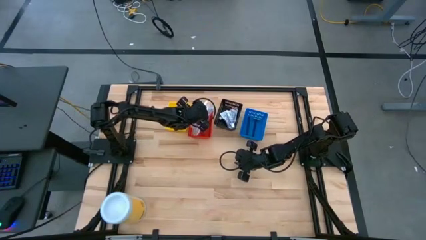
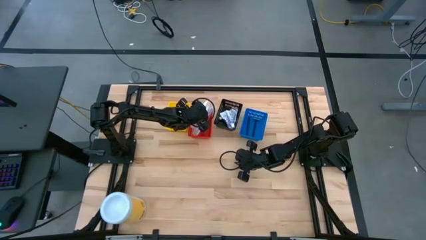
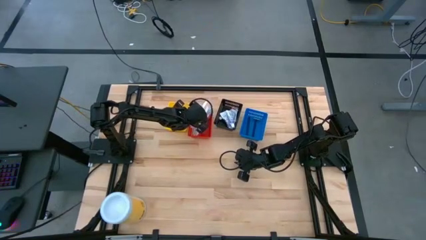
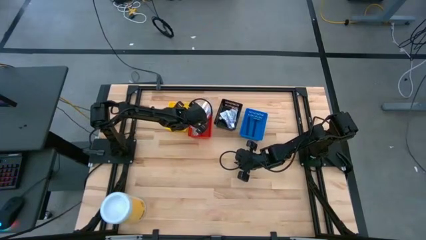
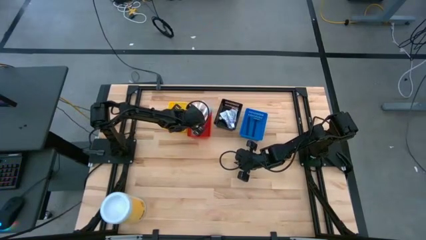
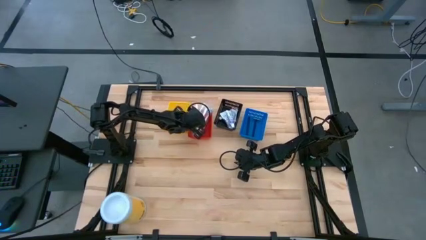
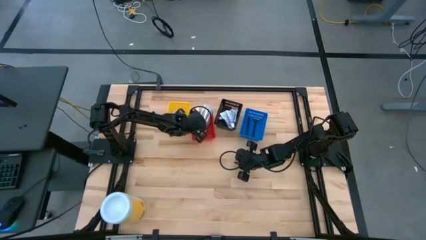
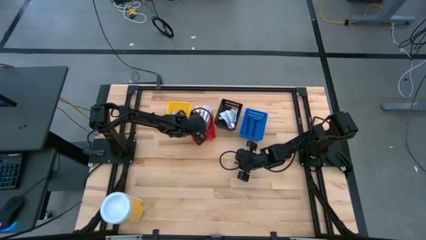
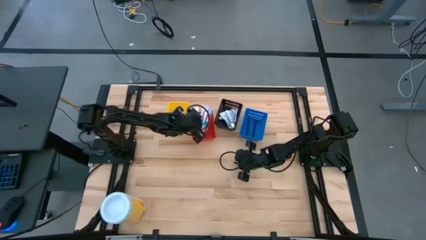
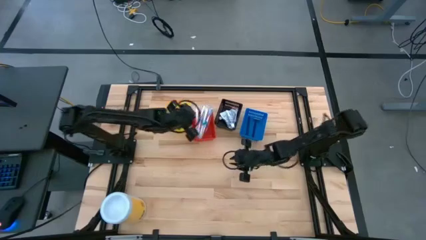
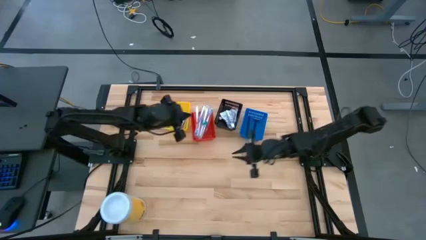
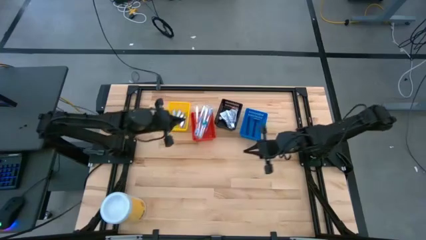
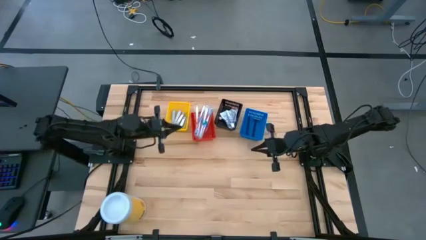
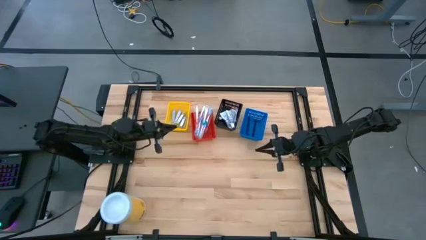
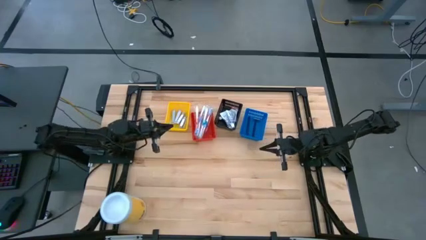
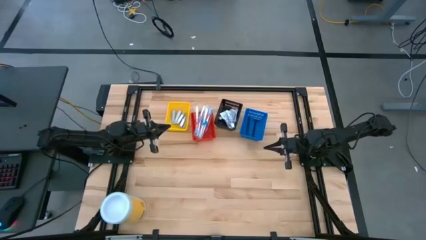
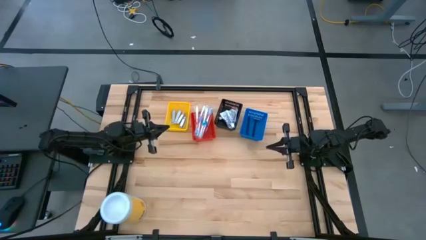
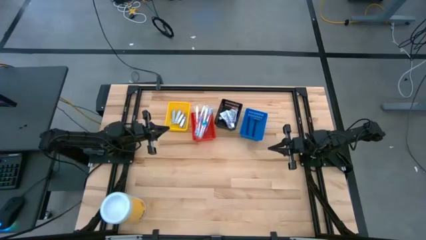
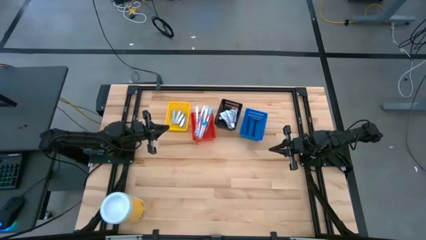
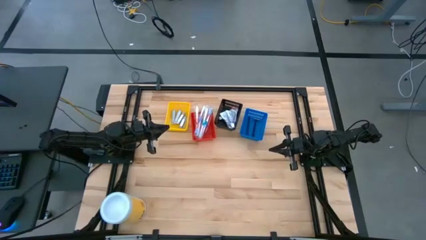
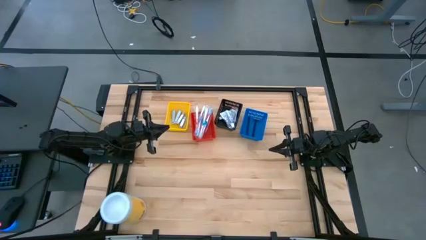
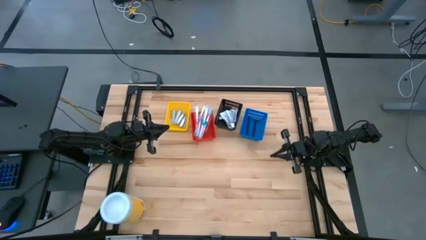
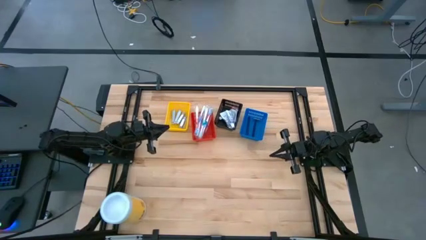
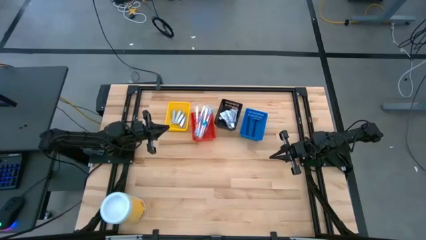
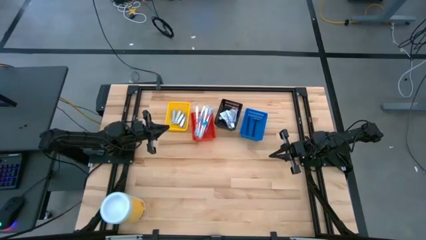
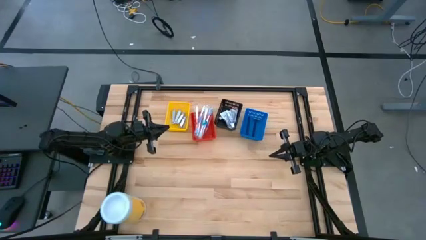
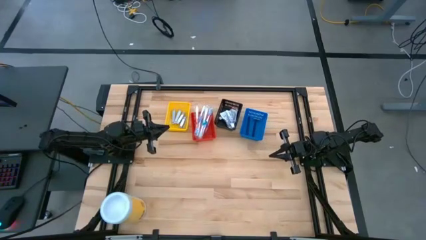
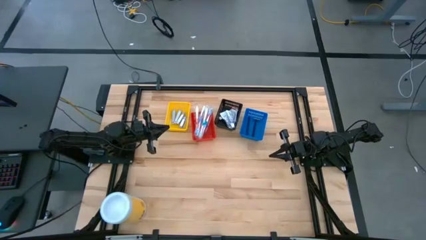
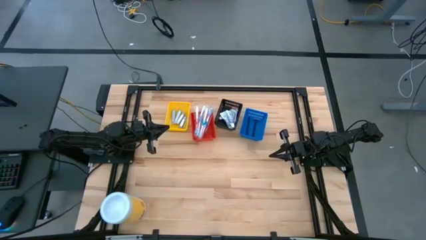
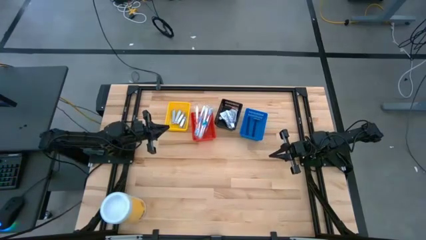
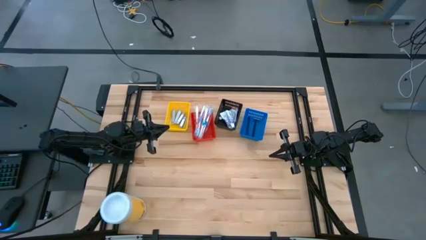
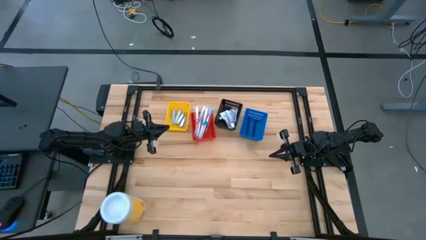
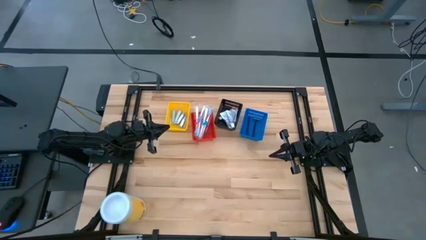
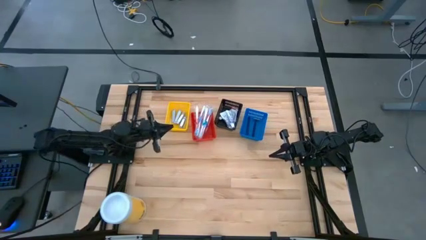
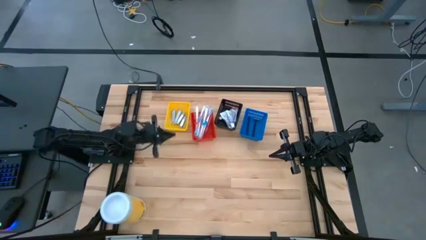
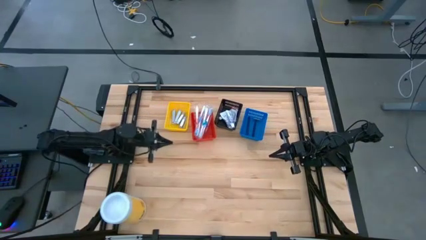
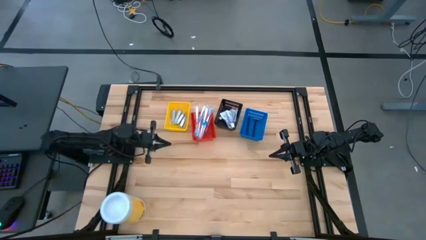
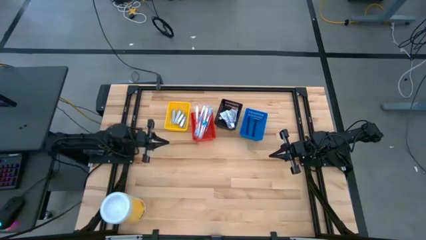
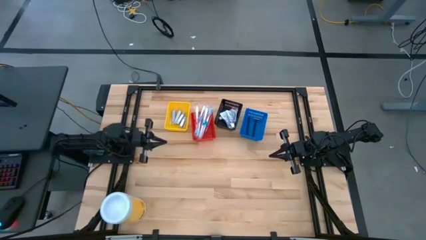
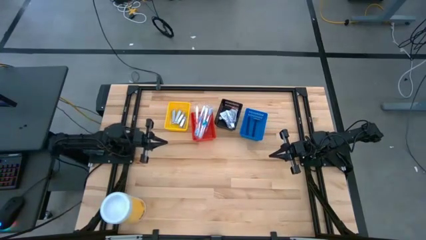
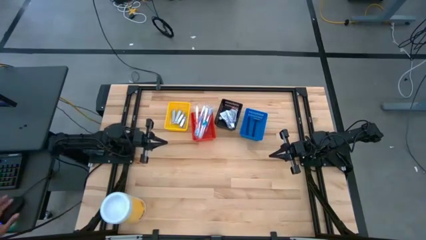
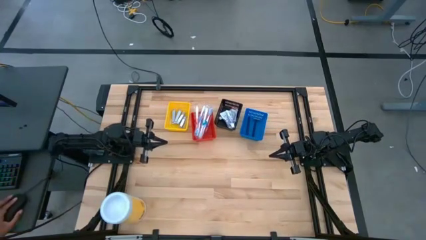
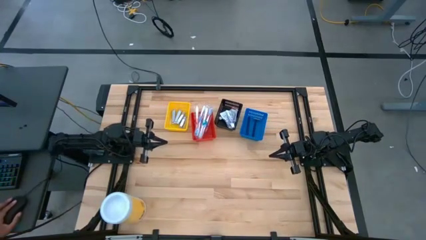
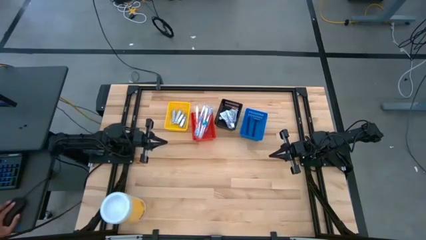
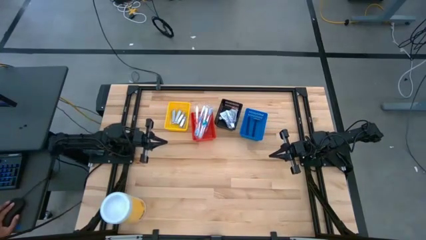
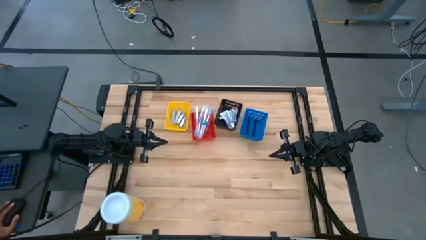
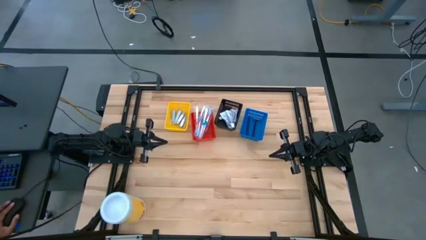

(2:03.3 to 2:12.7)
Task: Pick & Place Travel size toiletries
Return to Home Position

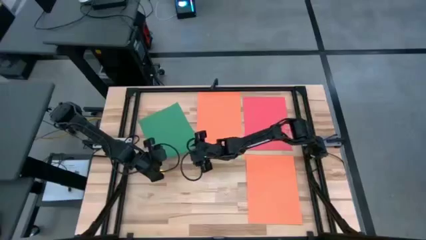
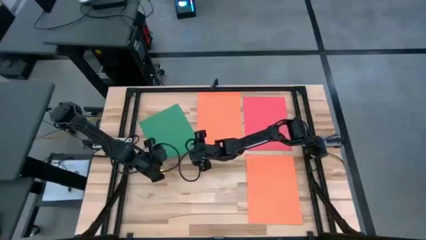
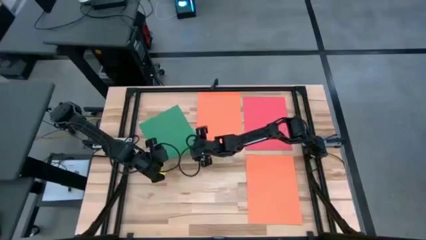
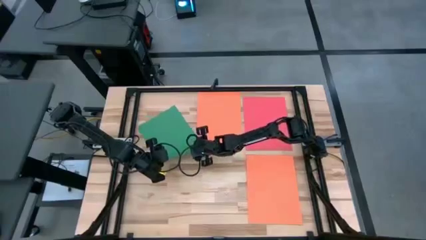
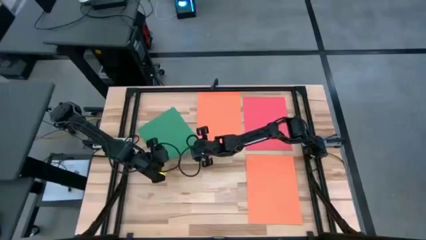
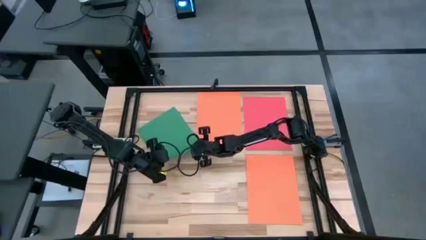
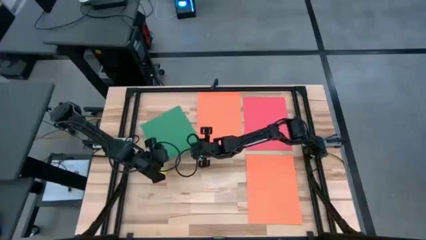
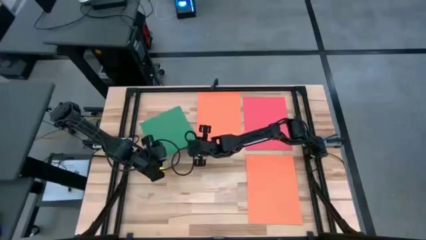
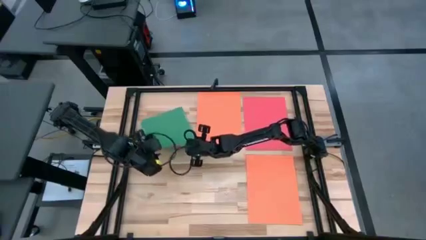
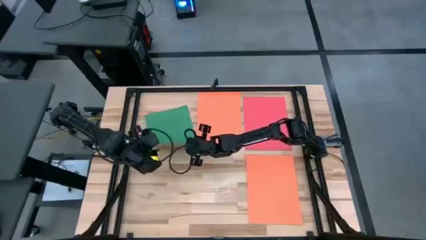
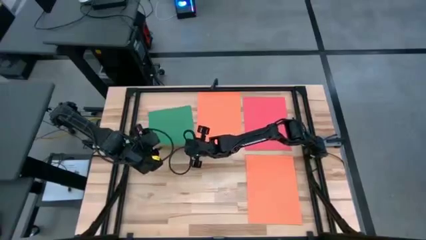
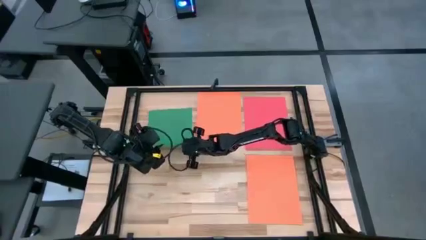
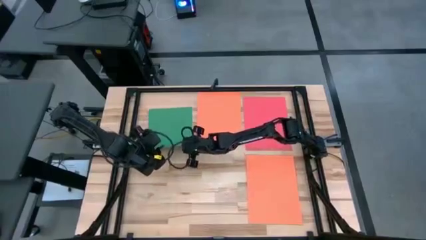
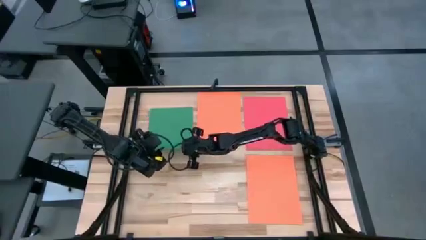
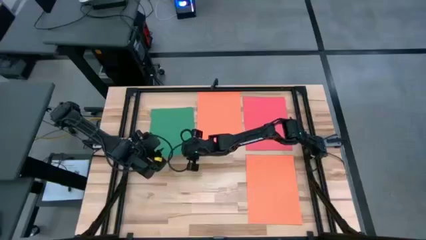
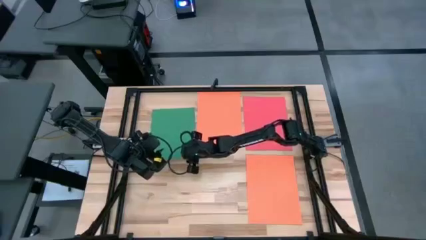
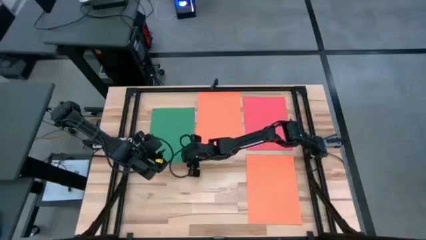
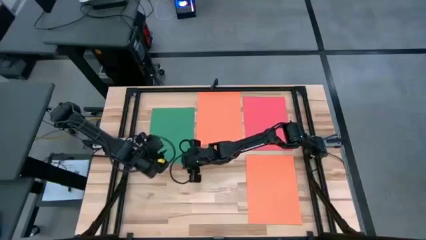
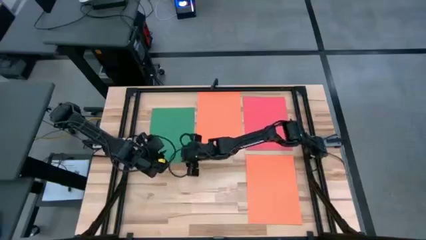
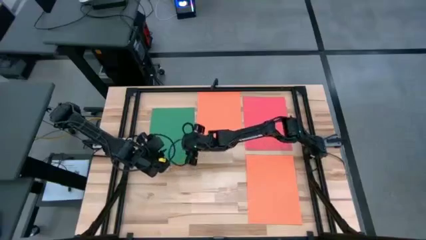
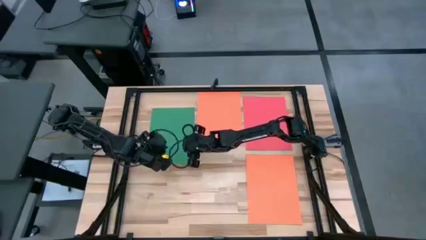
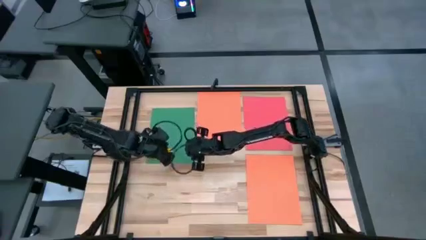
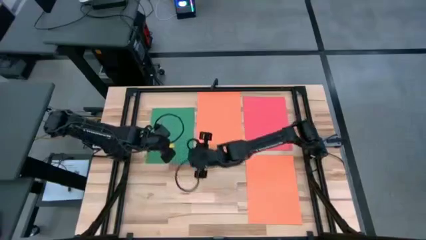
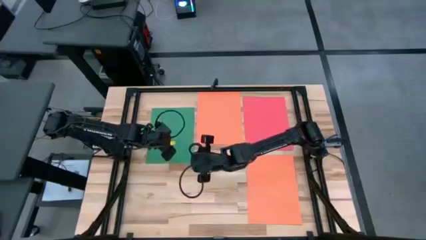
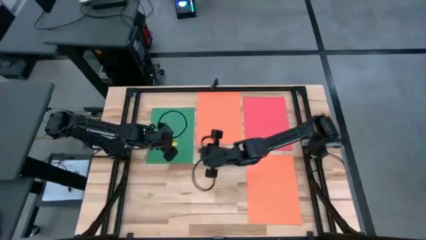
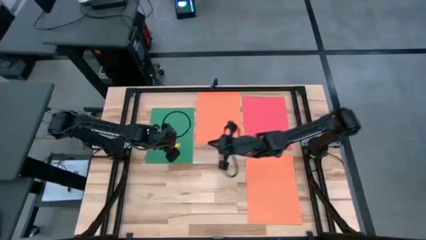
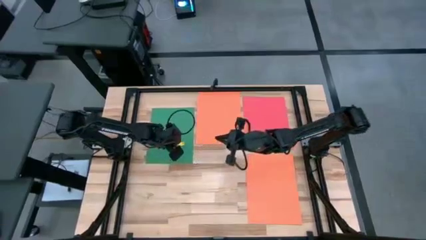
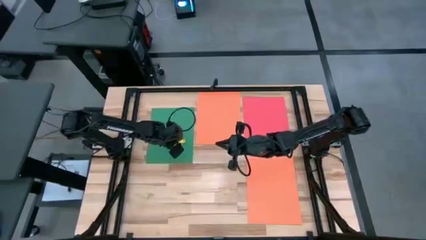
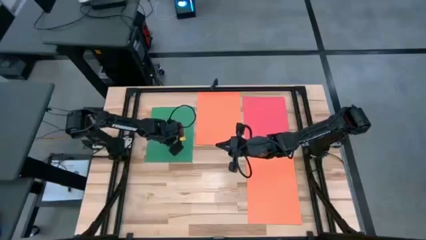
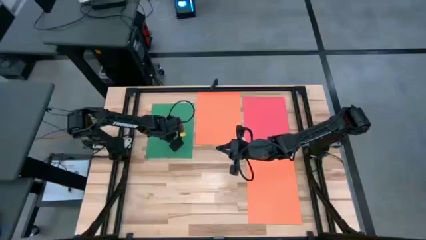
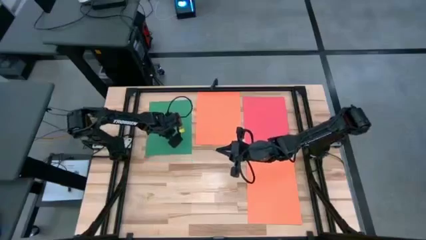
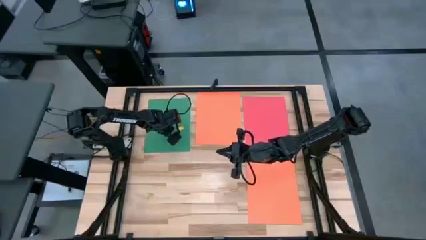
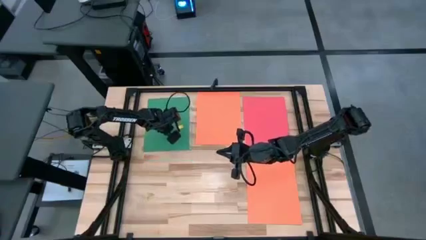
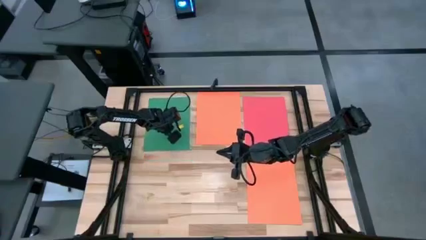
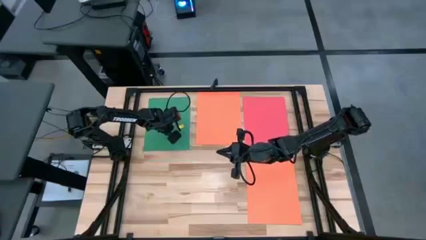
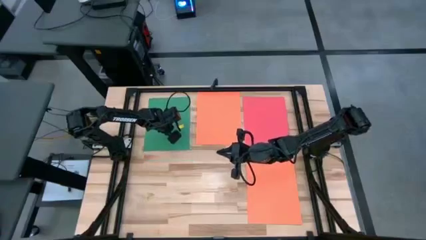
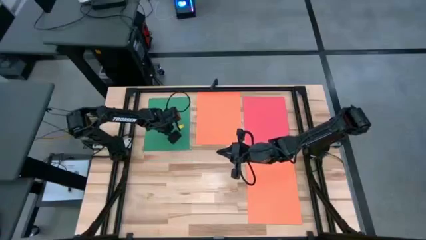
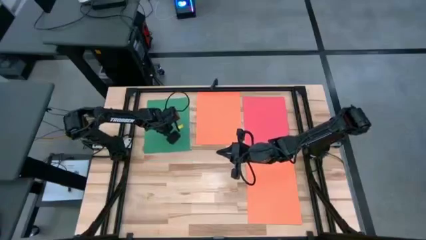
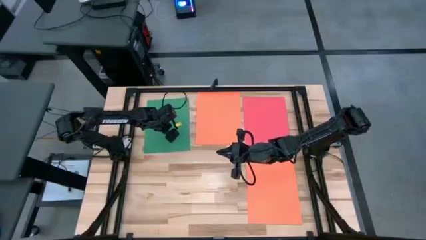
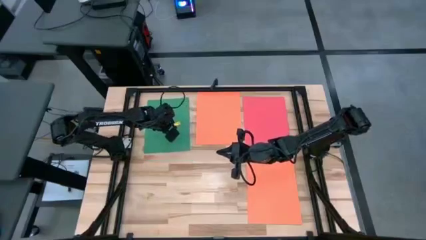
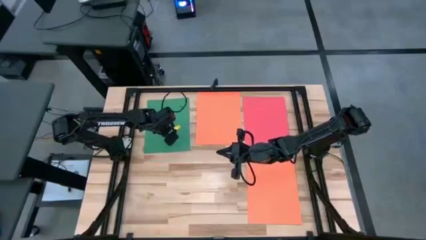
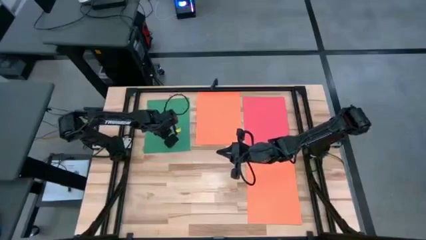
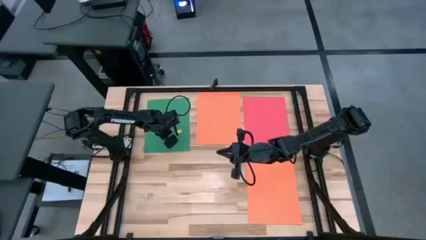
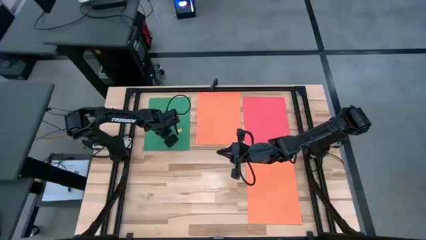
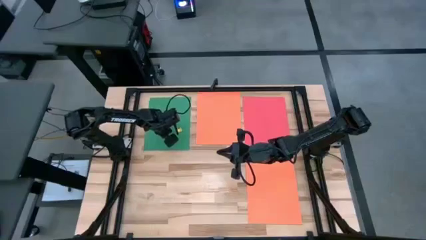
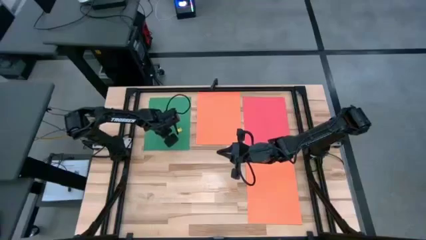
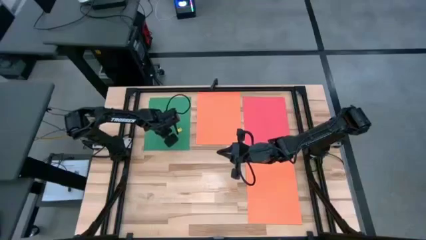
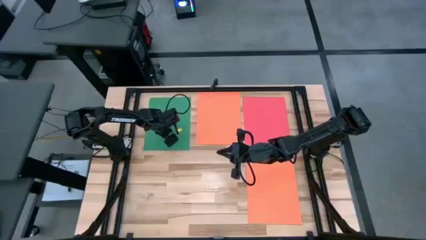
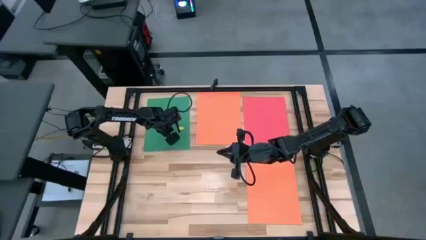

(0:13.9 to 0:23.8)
Task: Organize paper
Put the green paper on the top left of the table
